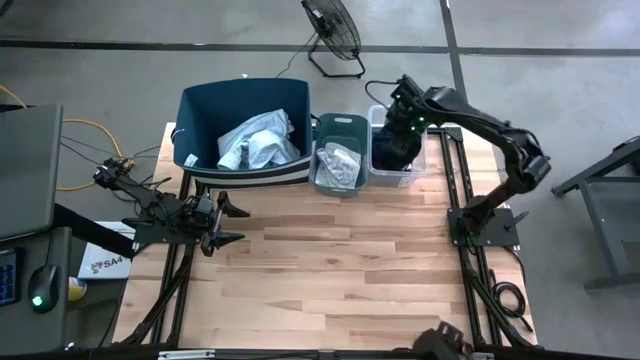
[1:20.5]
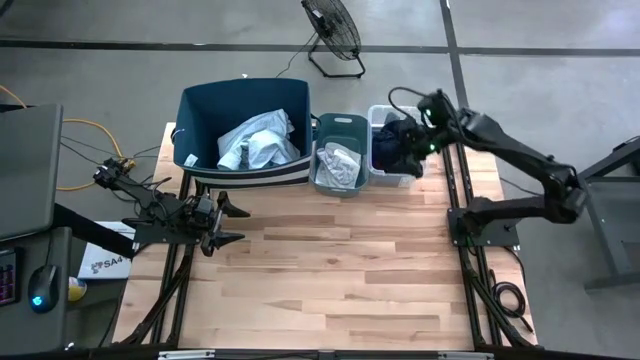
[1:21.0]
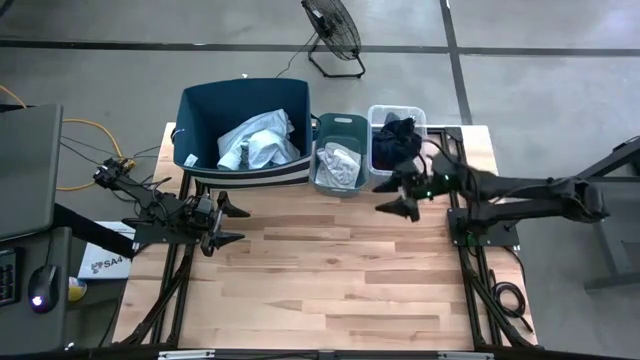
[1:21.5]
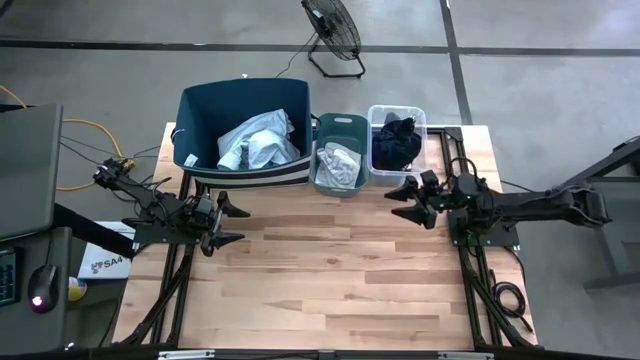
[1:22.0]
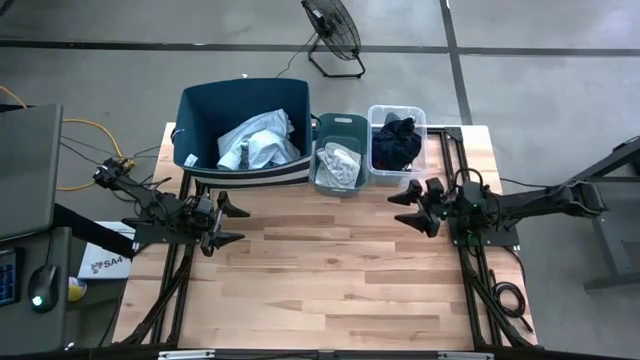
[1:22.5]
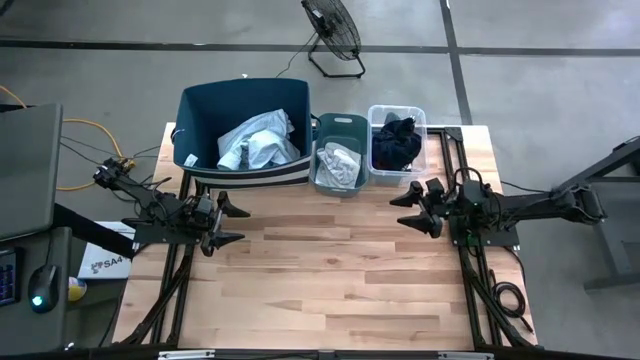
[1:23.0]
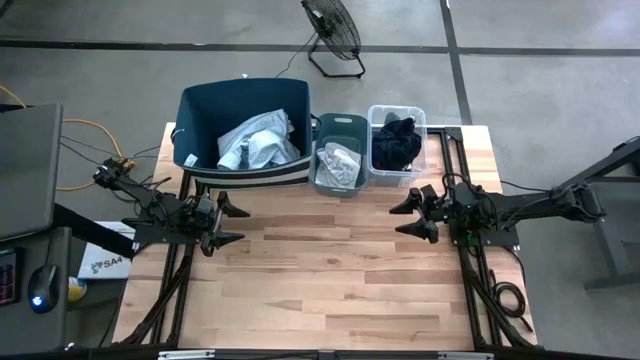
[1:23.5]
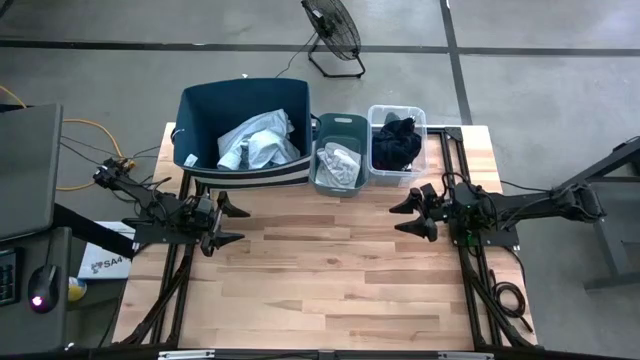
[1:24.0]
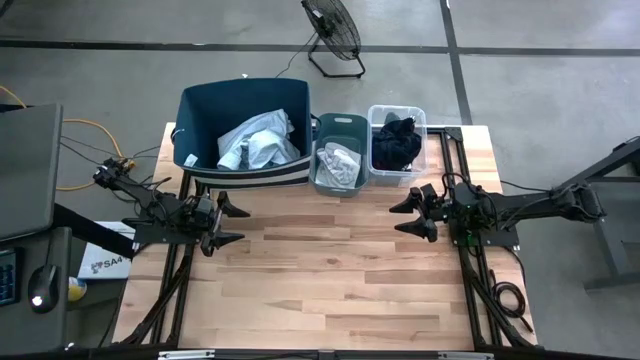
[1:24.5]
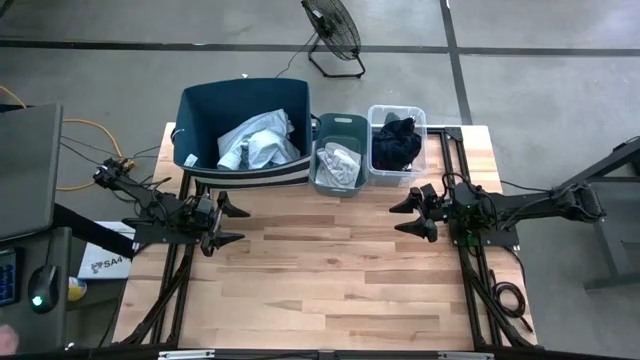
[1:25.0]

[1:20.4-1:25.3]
Task: Pick & Place Cloths
Return to Home Position

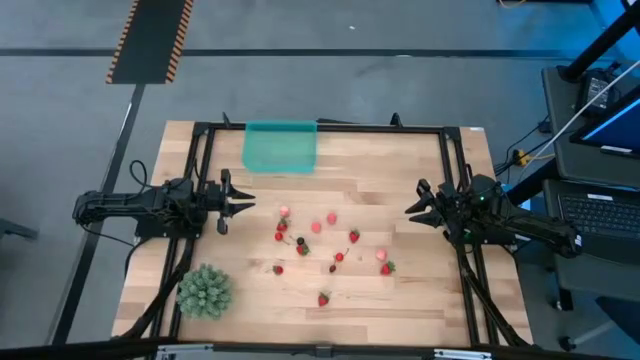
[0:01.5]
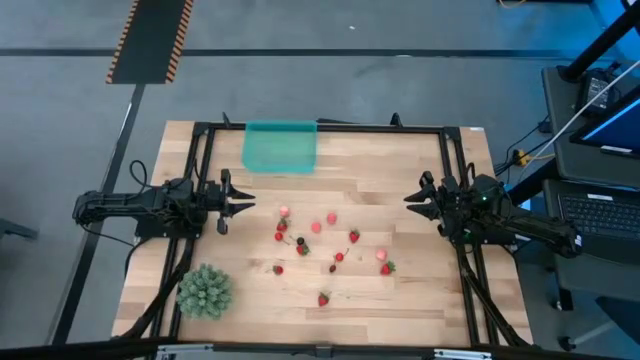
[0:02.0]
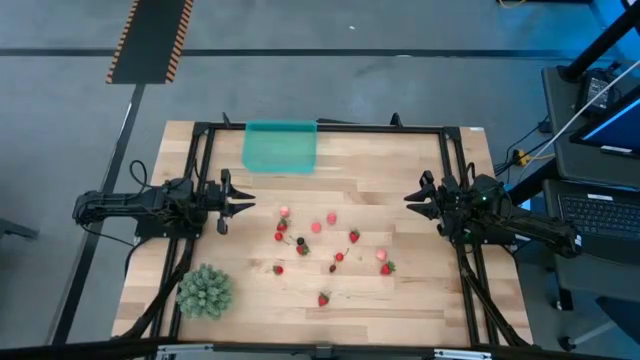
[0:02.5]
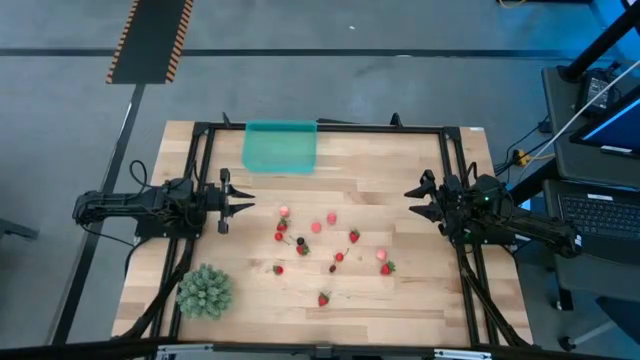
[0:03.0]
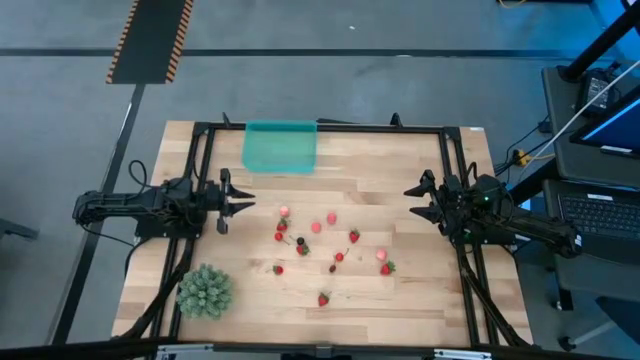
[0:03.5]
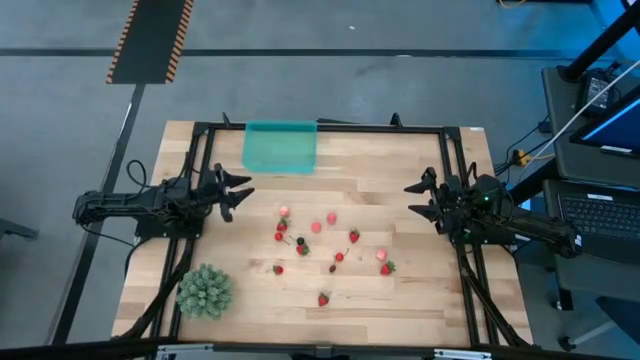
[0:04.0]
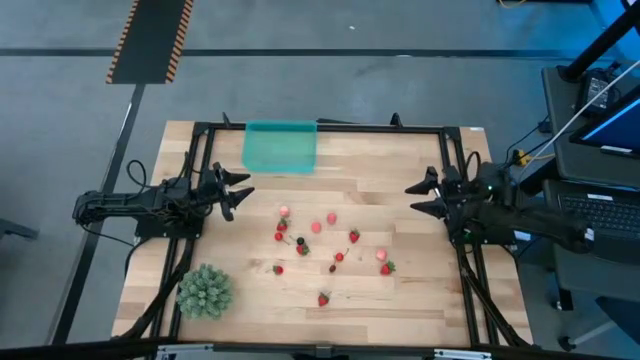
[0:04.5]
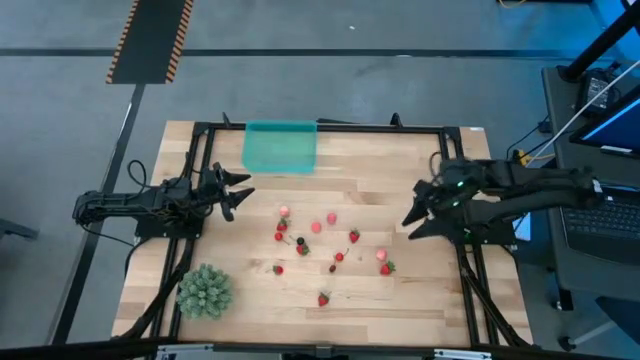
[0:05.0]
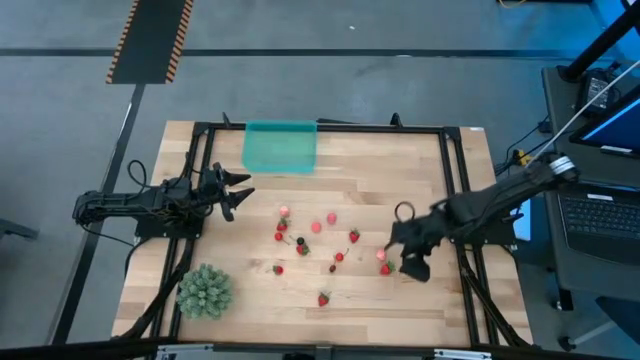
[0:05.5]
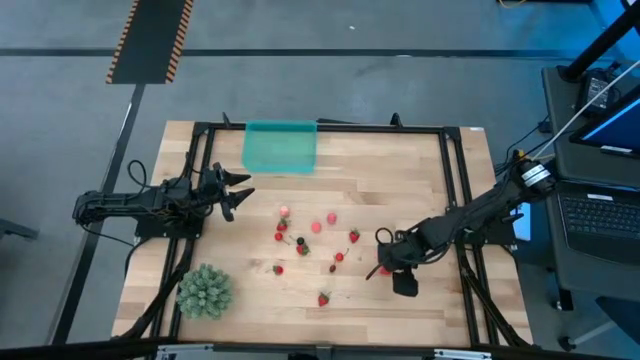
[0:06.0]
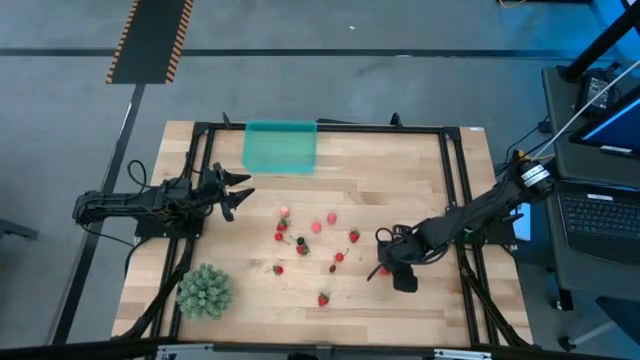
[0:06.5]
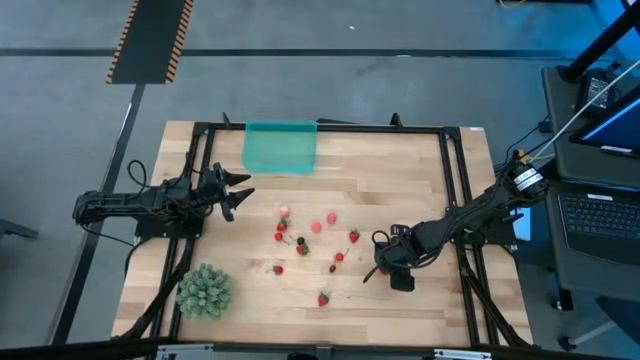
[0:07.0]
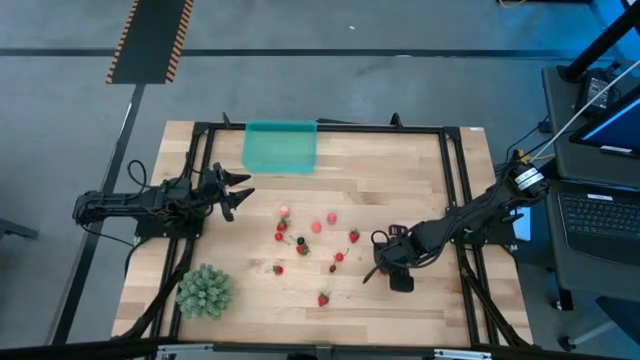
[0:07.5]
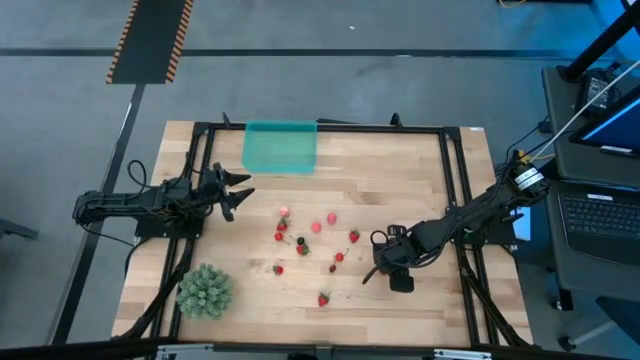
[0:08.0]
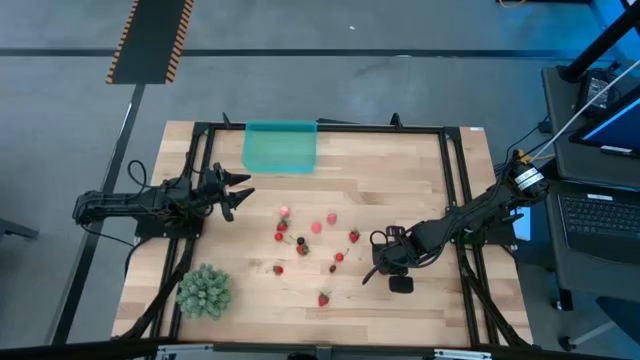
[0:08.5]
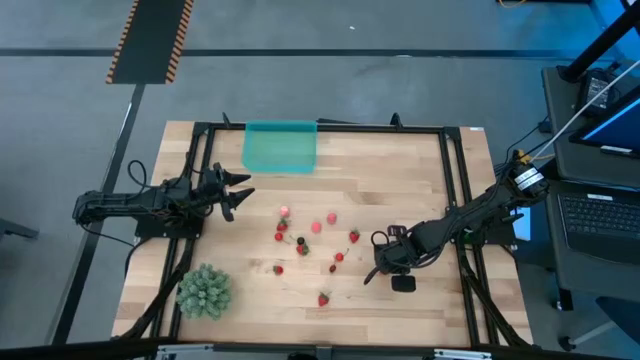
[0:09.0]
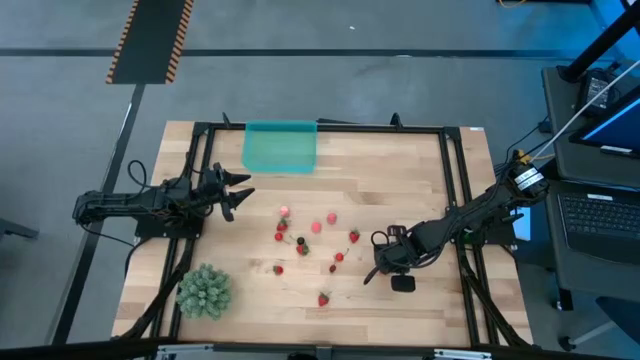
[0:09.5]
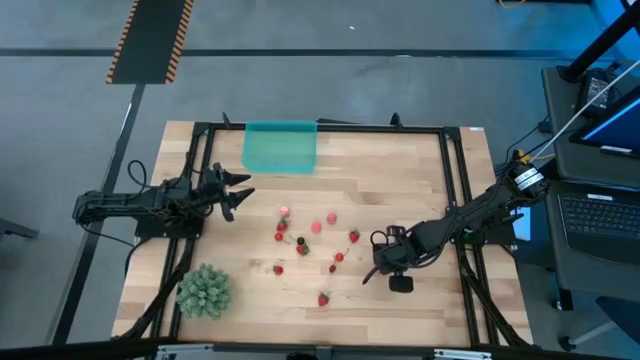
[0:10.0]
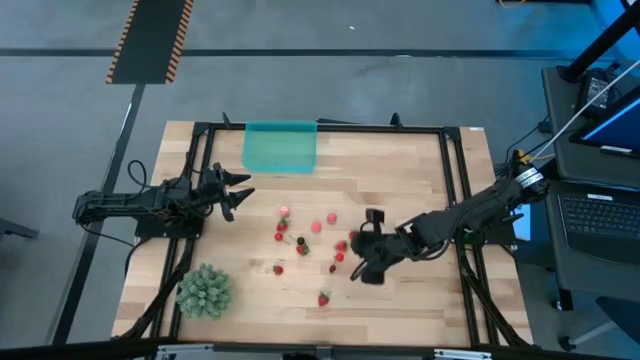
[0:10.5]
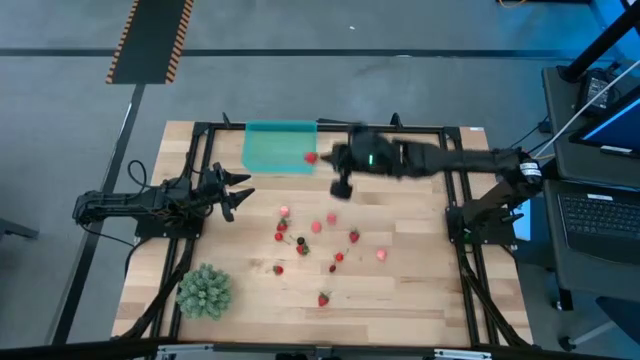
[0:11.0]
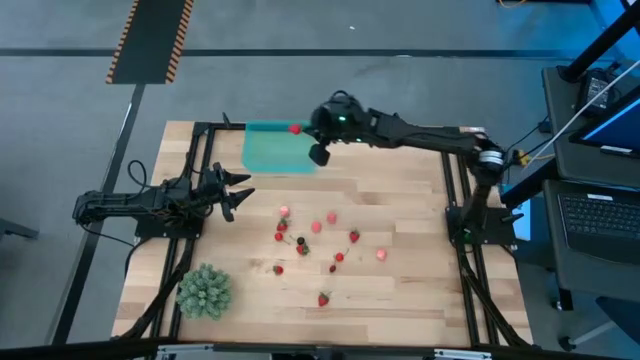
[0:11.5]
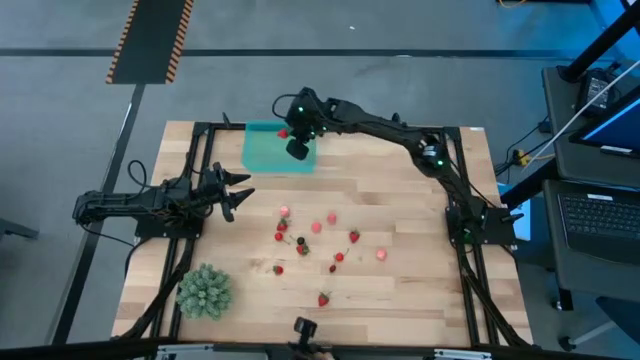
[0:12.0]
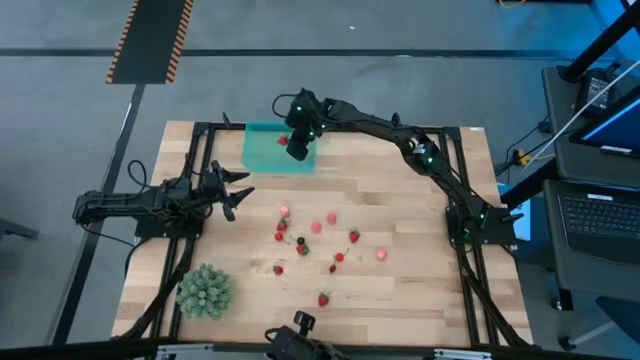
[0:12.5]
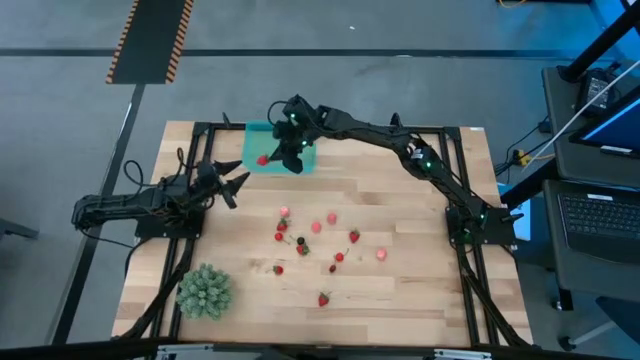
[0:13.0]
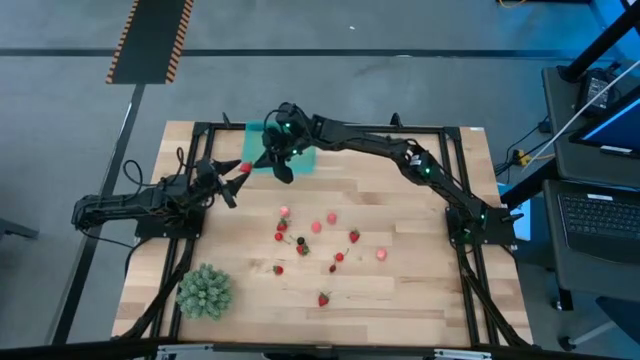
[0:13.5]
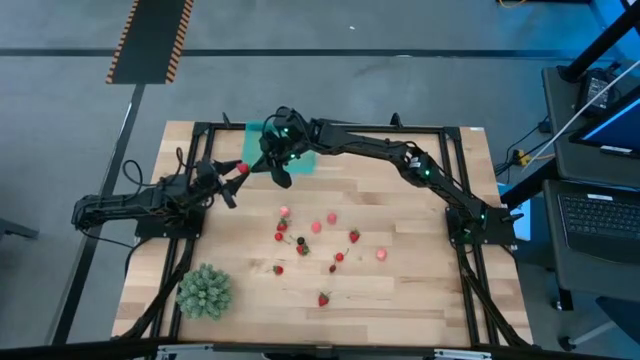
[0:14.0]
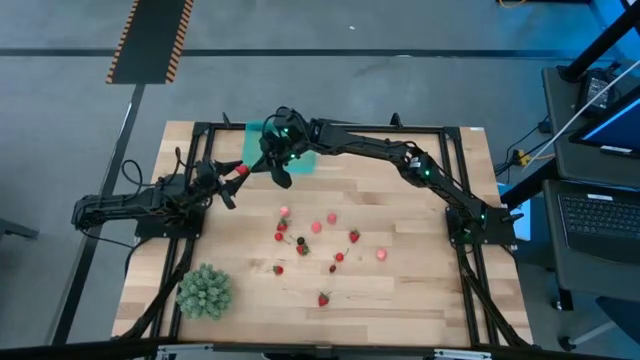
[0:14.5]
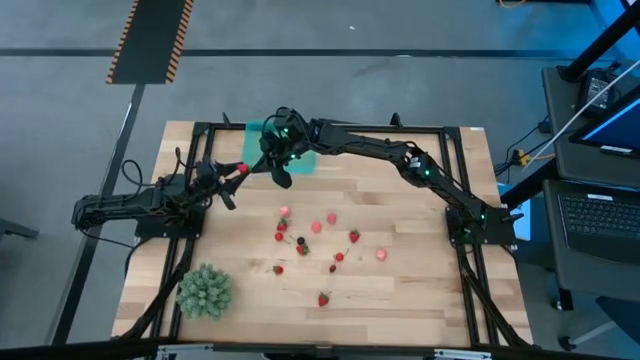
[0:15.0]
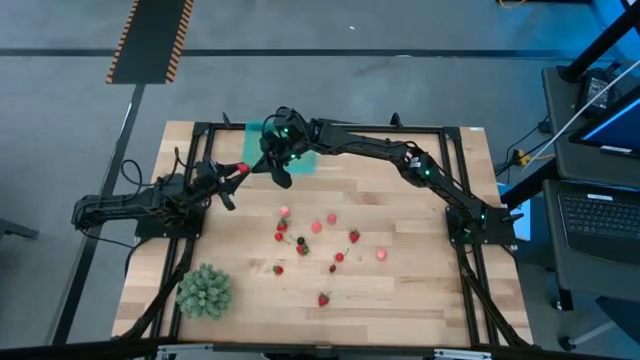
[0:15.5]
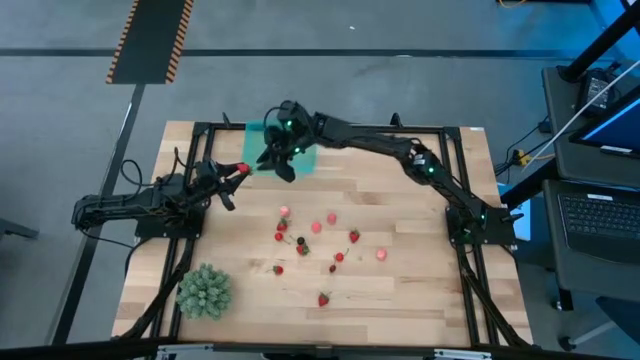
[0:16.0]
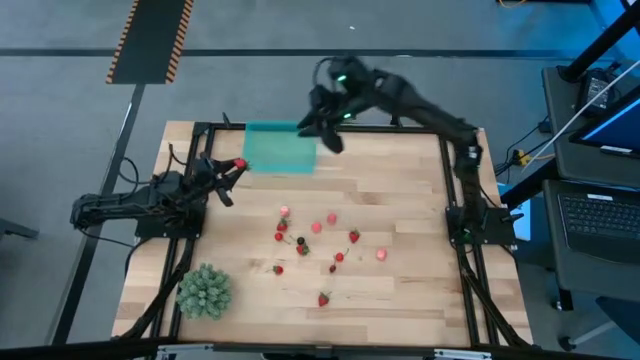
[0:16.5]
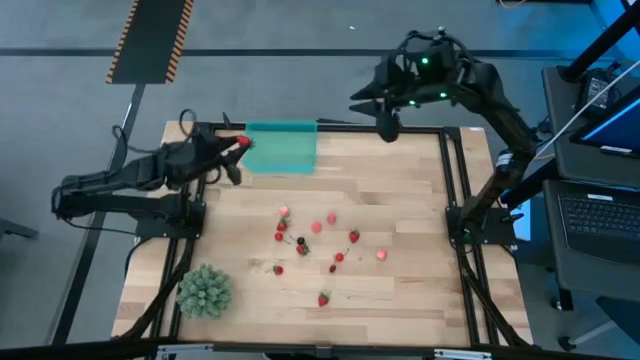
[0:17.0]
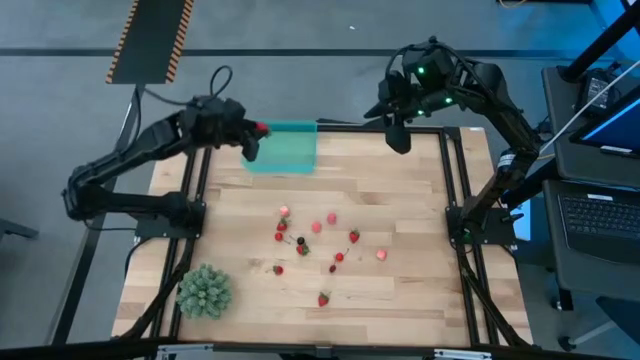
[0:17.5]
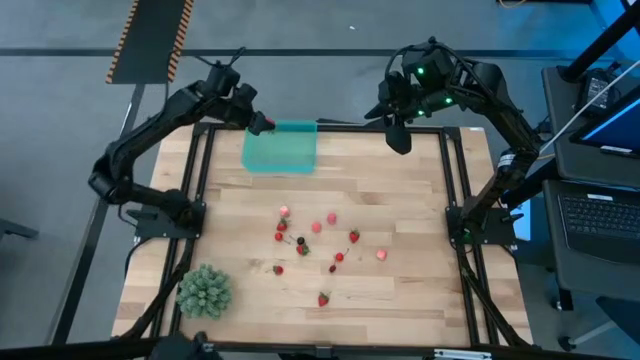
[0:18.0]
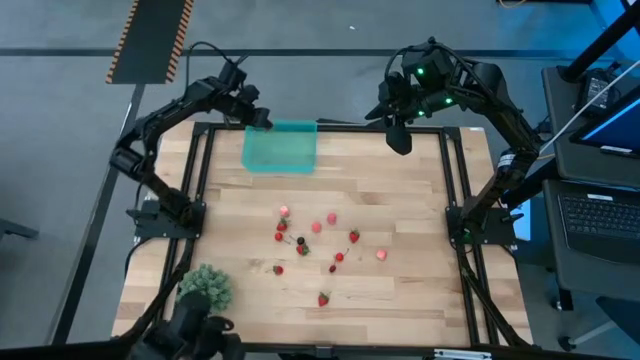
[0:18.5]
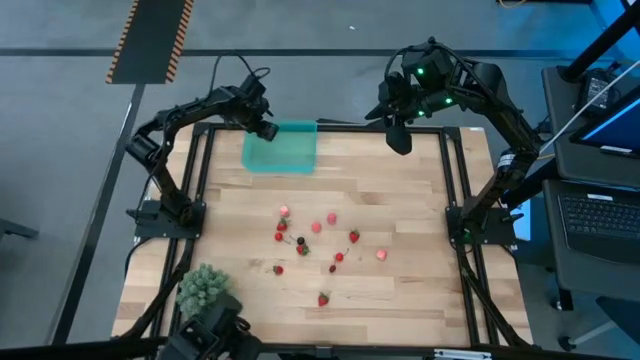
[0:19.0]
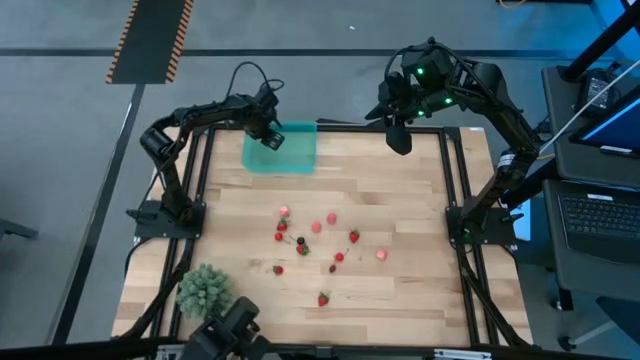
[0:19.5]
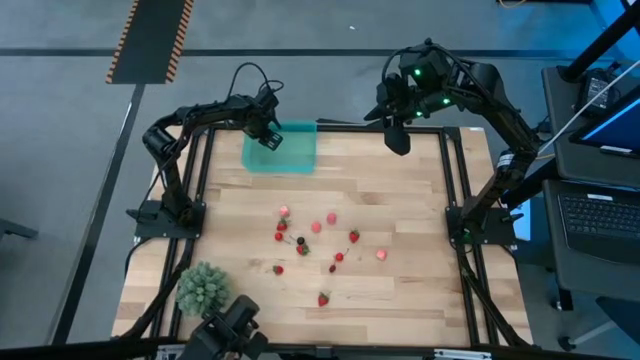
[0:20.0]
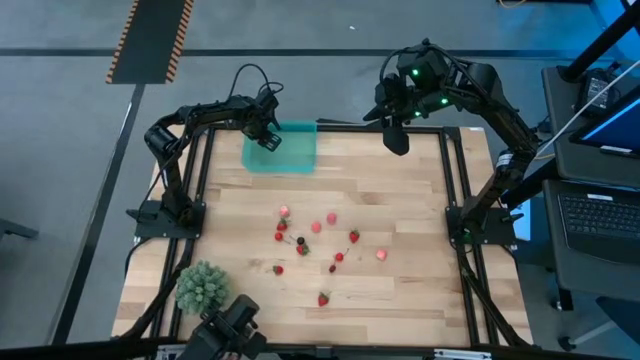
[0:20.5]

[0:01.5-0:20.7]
Task: Pick and placing Produce into tupperware
Put the red strawberry into the blue bin
